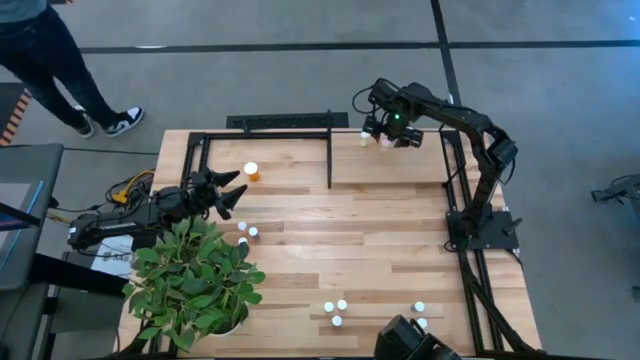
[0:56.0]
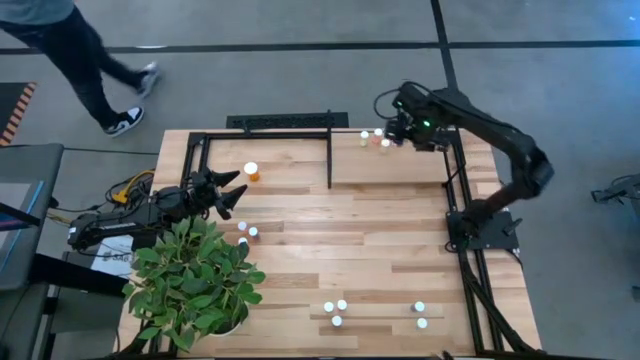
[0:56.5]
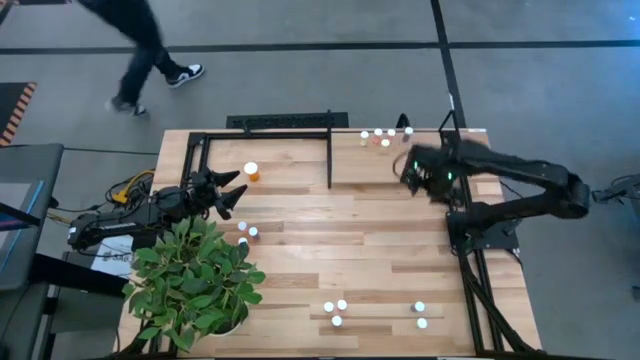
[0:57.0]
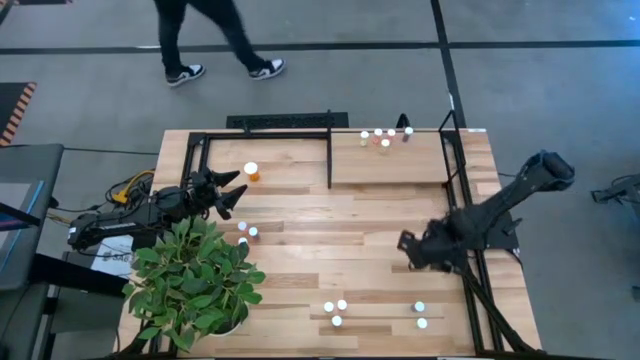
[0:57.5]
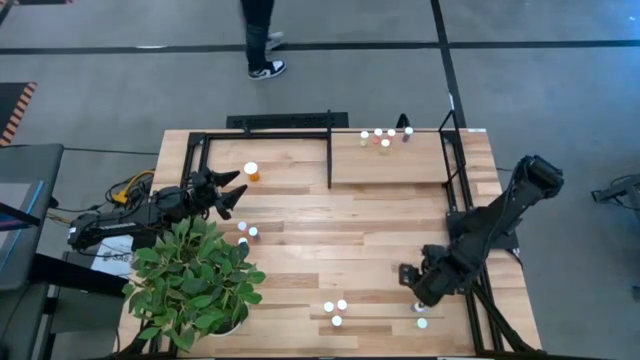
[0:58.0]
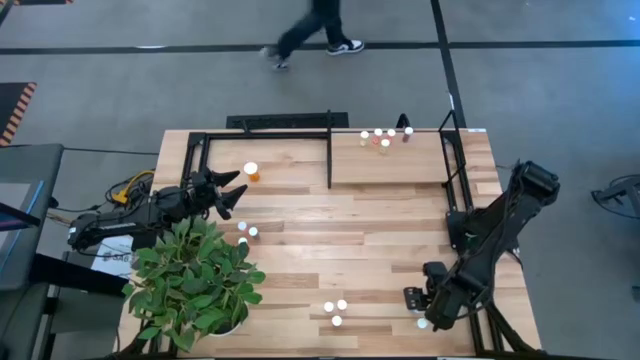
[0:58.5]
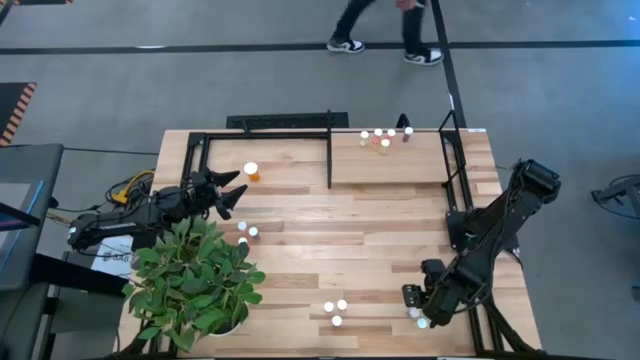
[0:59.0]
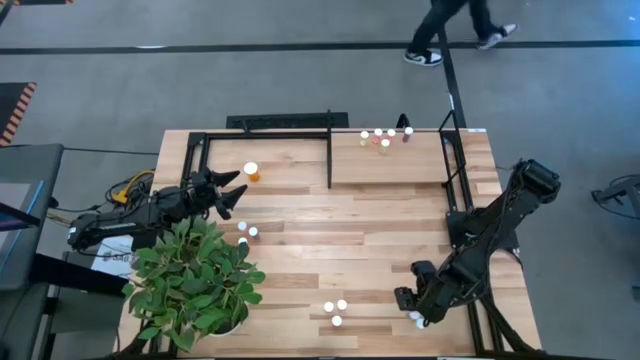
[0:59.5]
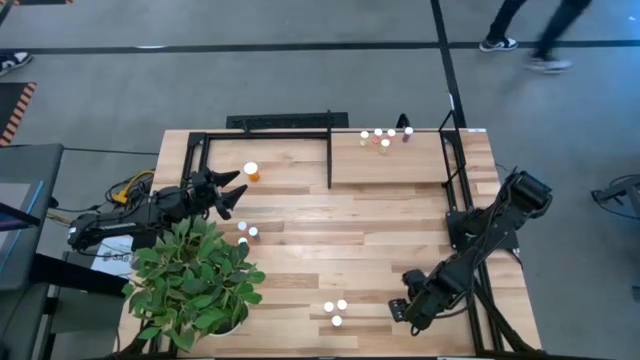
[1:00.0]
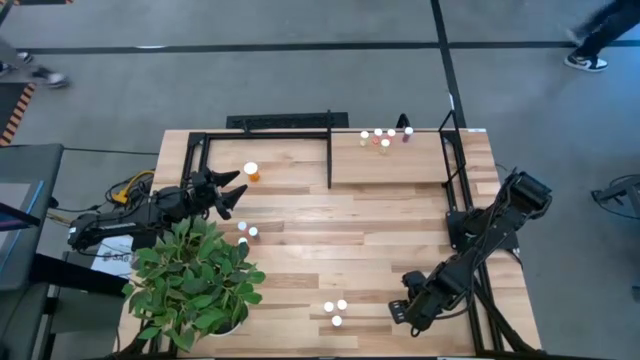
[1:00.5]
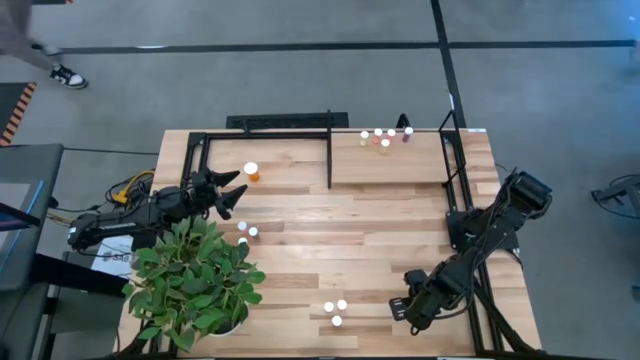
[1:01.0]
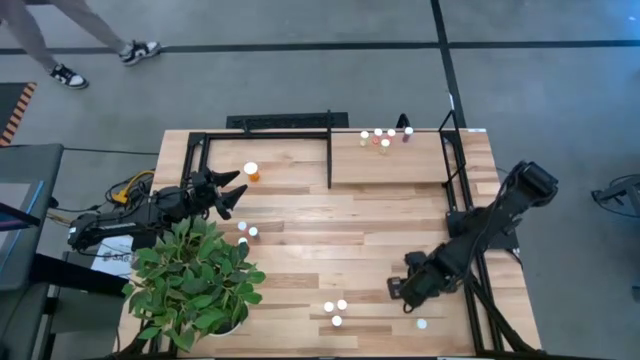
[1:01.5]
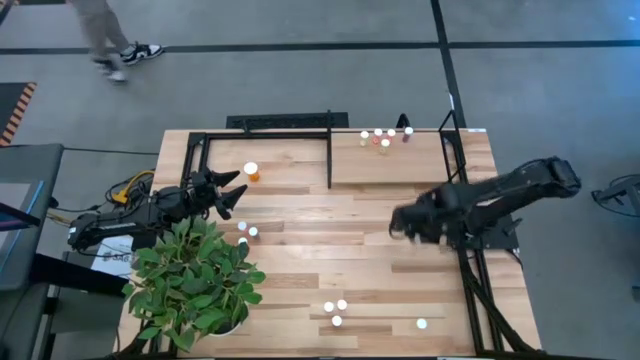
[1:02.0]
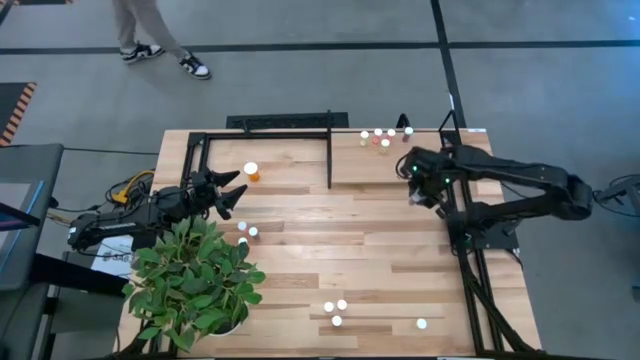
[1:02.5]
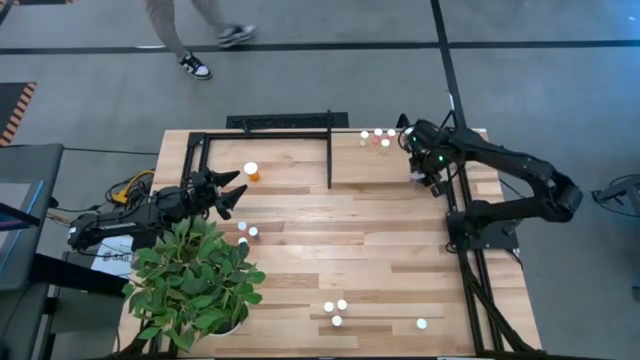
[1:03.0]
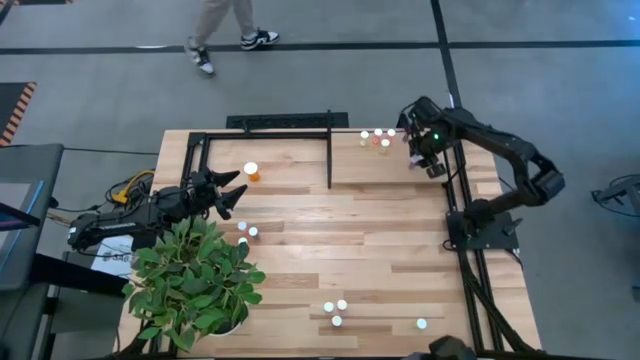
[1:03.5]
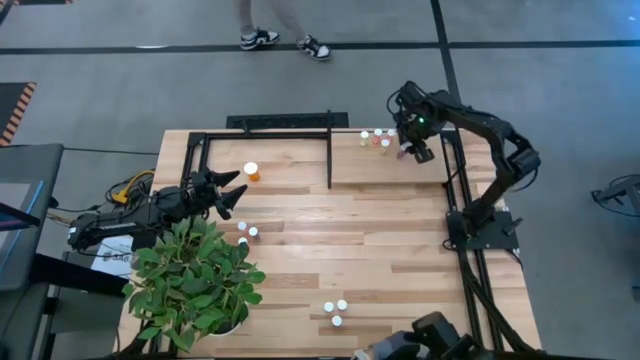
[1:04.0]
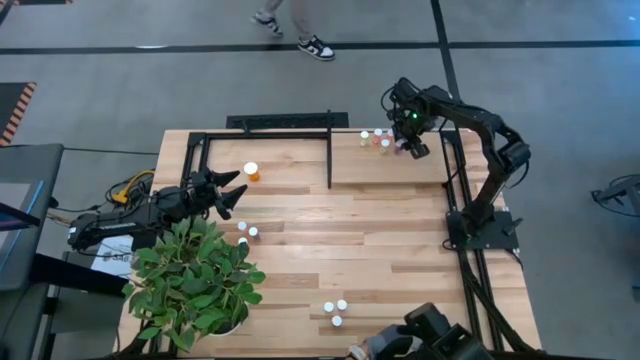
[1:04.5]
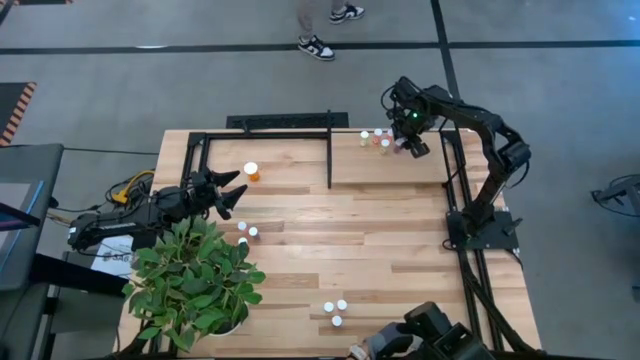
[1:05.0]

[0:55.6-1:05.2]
Task: Pick and place medicine bottles onto shelf by color
Put the blue pill bottle on the shelf

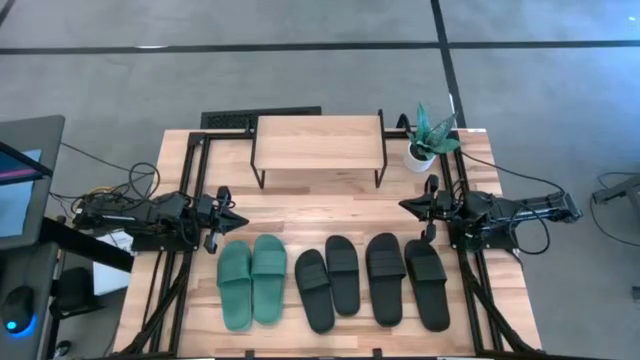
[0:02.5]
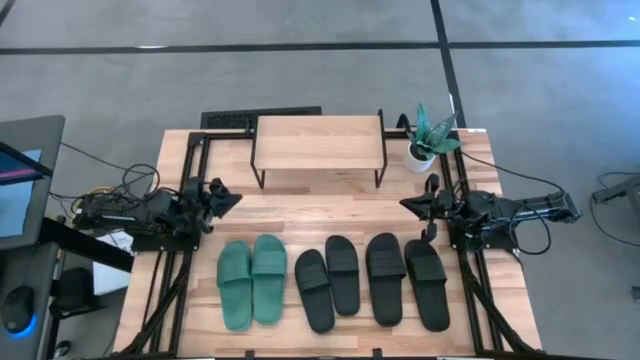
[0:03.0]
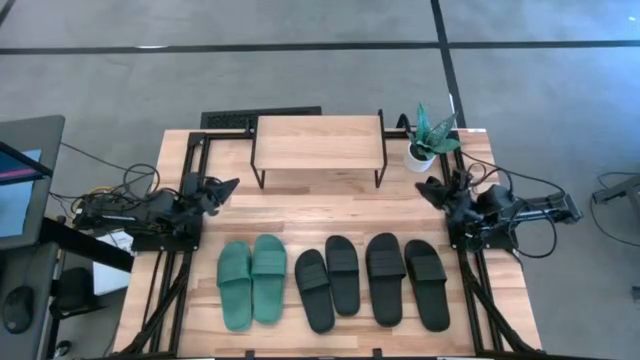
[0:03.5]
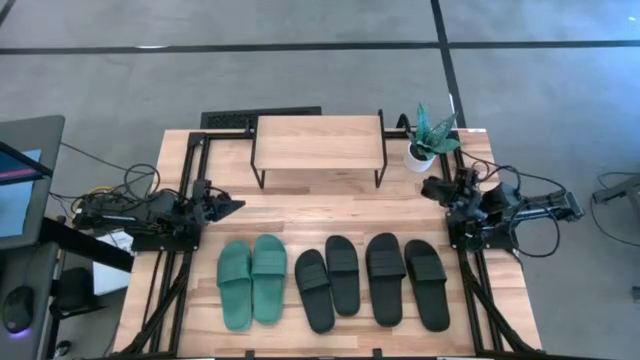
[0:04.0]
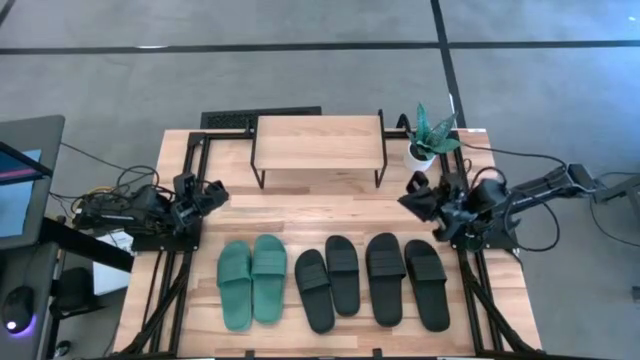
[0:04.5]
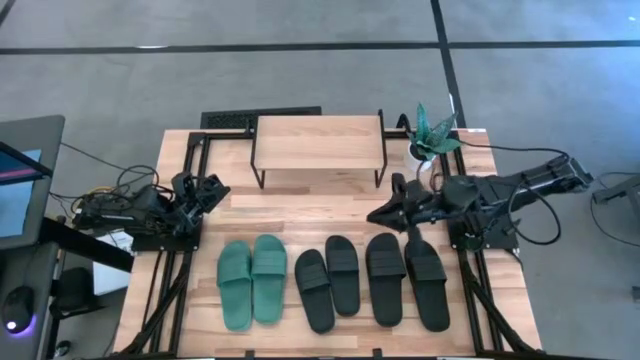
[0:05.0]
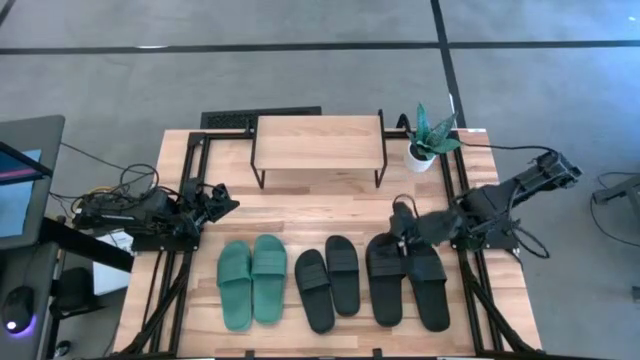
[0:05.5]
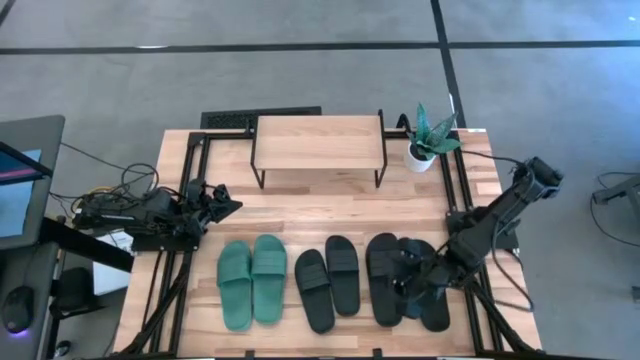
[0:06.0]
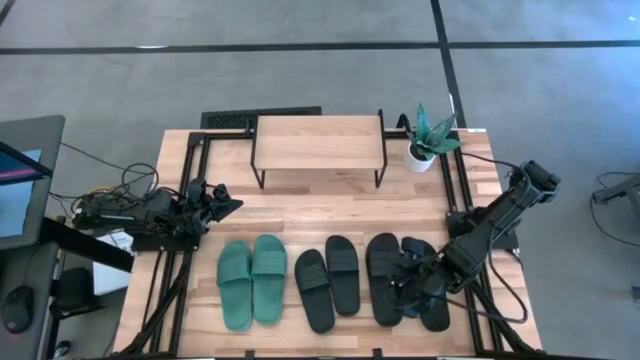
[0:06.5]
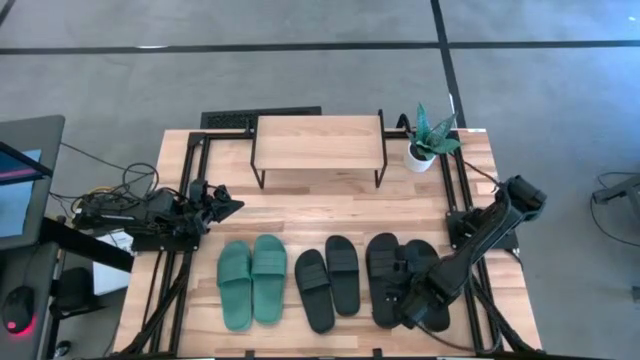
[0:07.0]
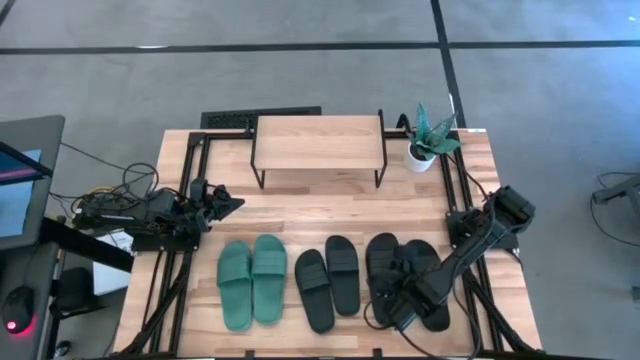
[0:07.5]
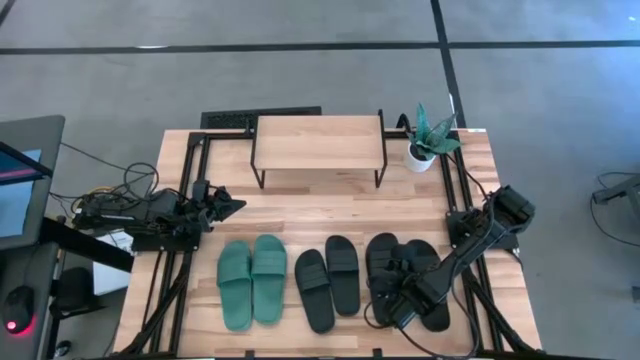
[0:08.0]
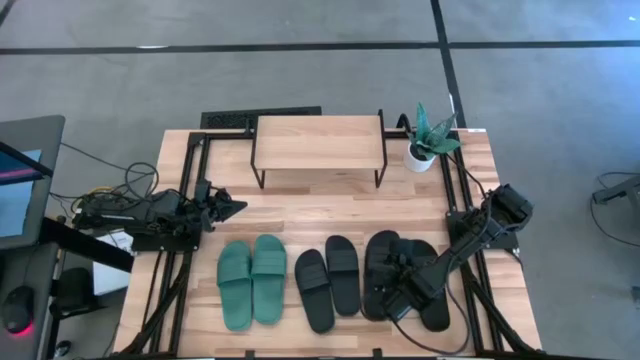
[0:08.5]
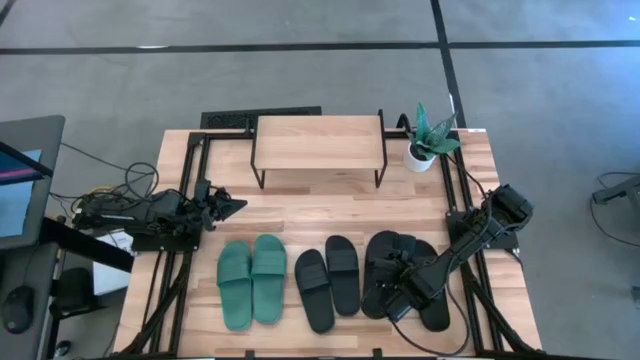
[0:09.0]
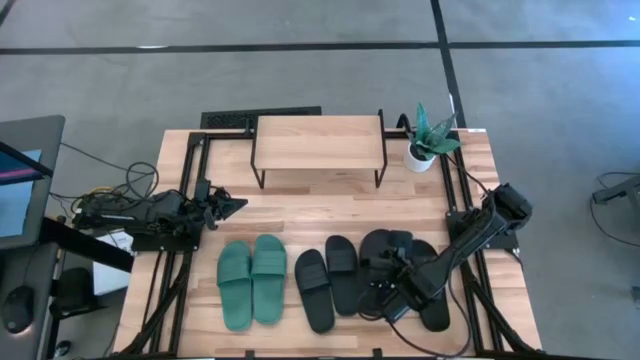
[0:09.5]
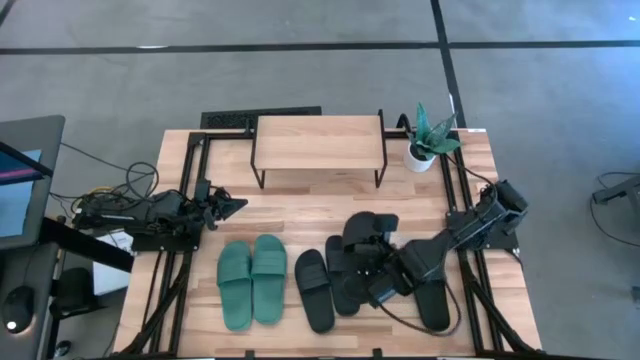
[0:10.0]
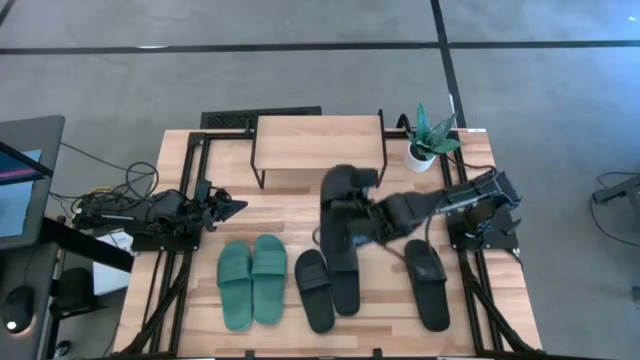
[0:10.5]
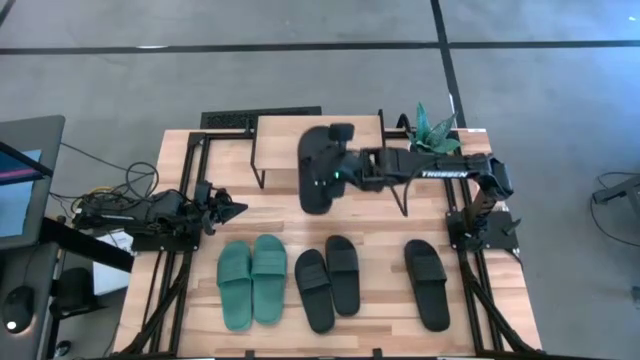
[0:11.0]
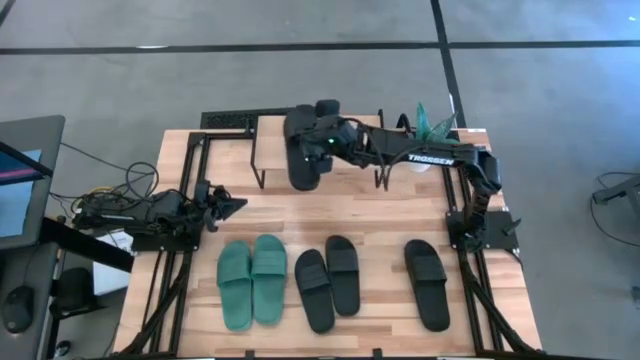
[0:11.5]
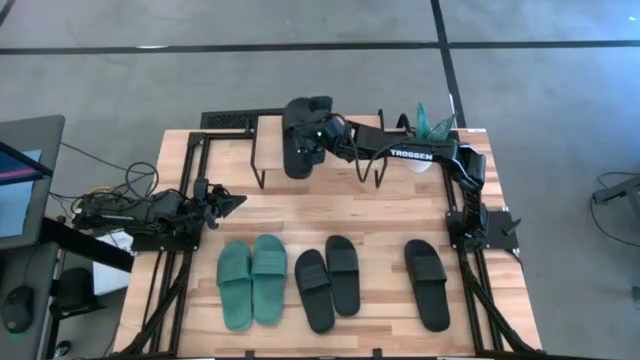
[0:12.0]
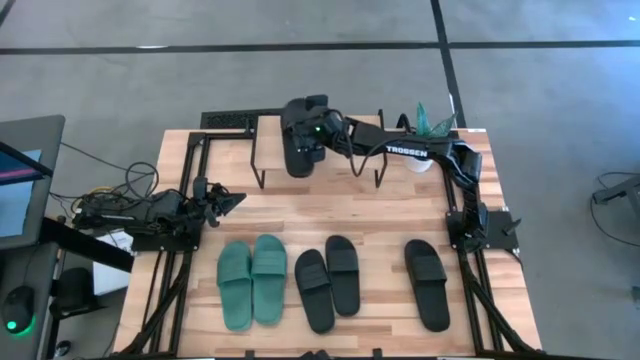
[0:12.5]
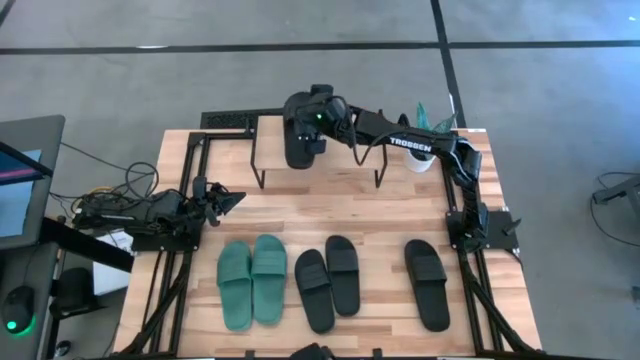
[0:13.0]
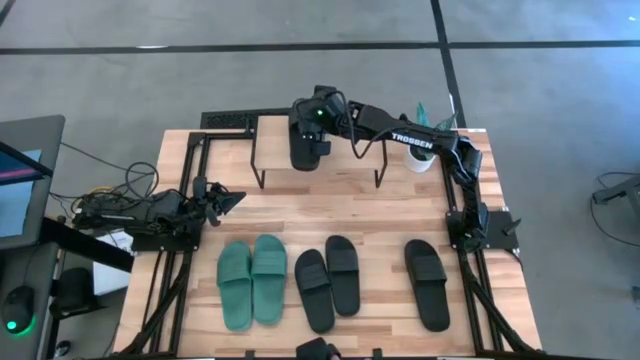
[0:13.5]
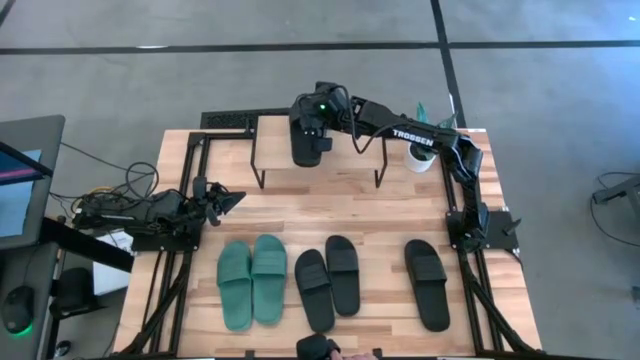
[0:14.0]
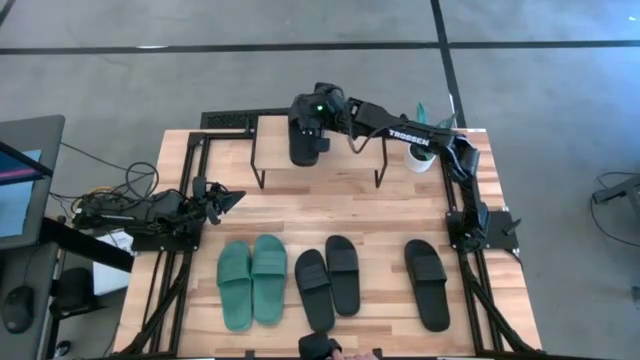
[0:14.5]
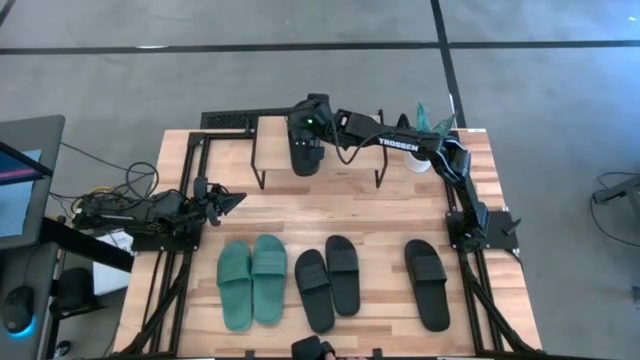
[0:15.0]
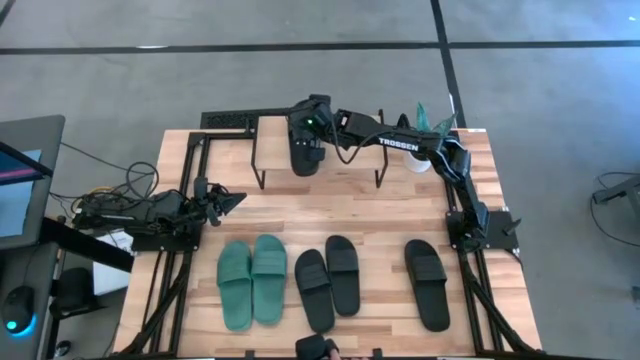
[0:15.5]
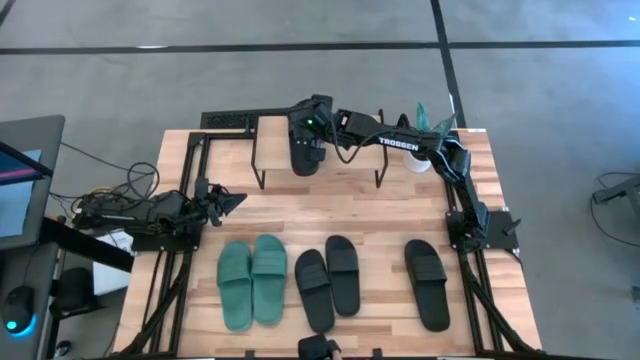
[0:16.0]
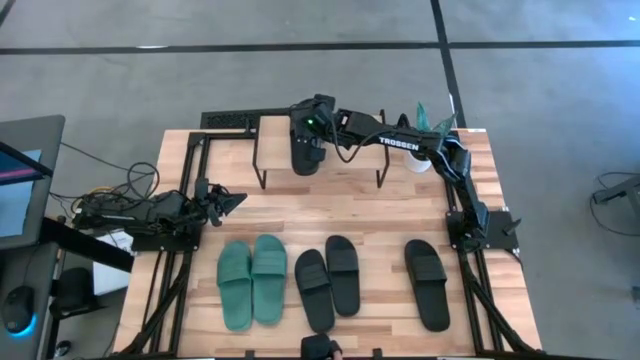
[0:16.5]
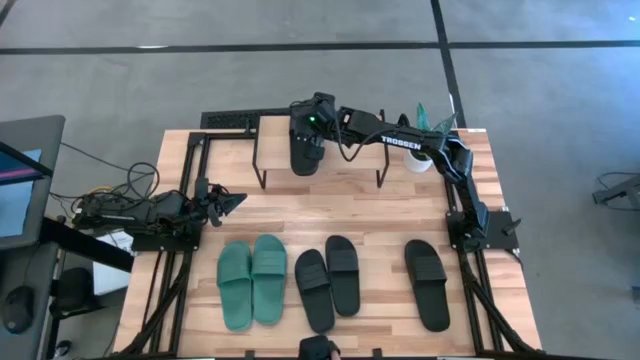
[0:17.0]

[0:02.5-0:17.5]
Task: Pick and place slides into the shelf
Put the black slide on the shelf
